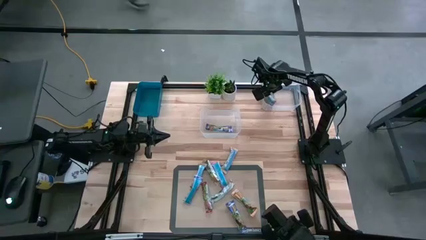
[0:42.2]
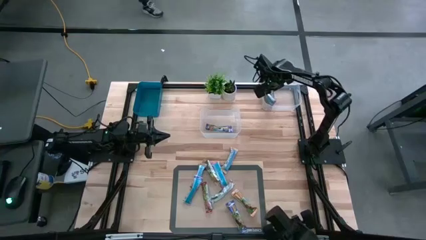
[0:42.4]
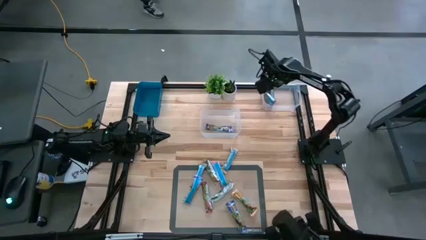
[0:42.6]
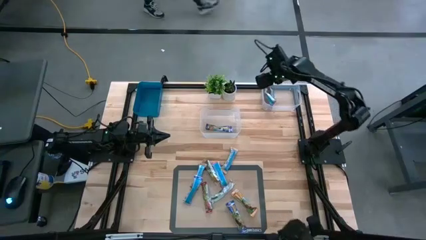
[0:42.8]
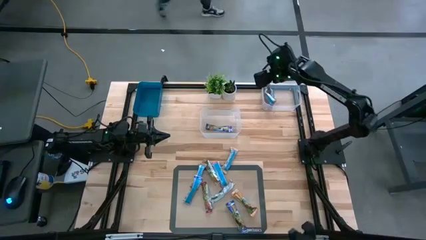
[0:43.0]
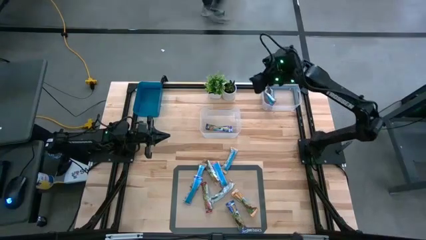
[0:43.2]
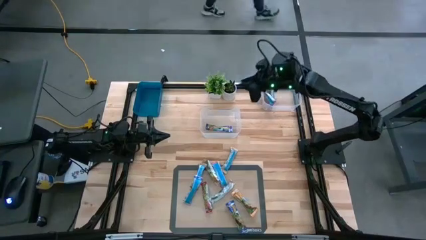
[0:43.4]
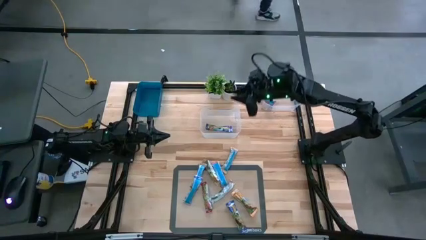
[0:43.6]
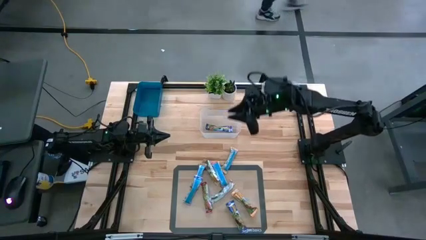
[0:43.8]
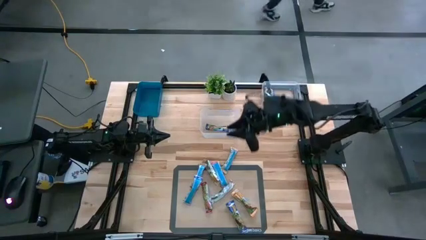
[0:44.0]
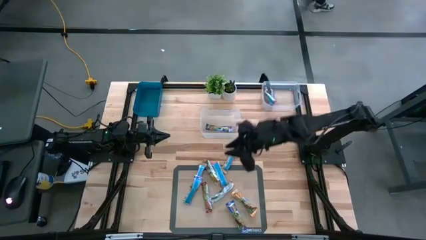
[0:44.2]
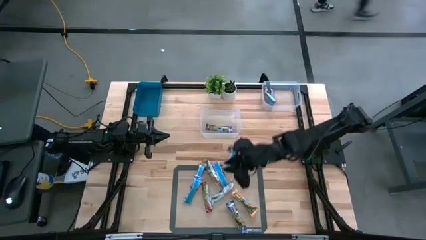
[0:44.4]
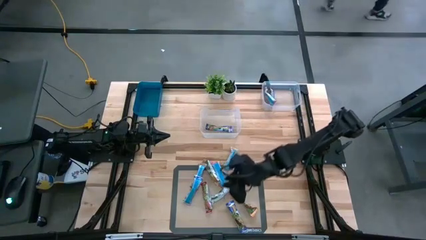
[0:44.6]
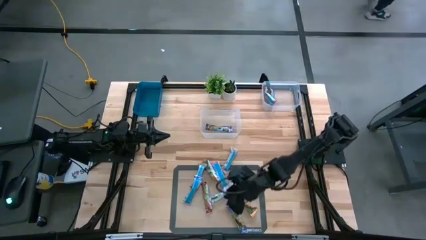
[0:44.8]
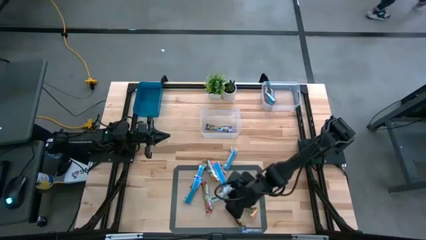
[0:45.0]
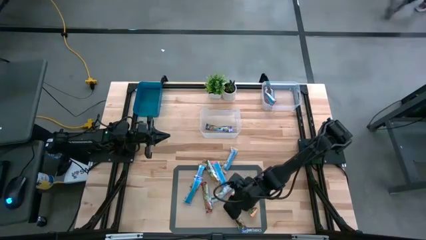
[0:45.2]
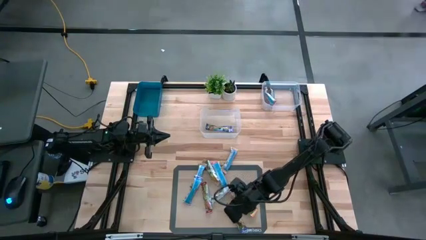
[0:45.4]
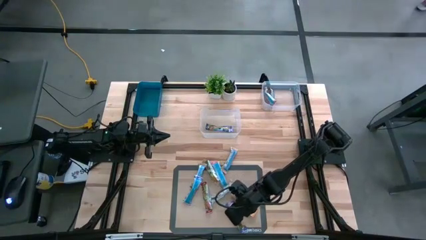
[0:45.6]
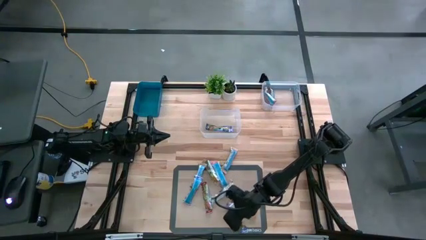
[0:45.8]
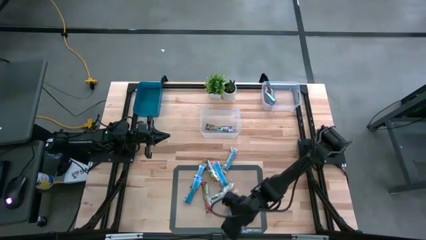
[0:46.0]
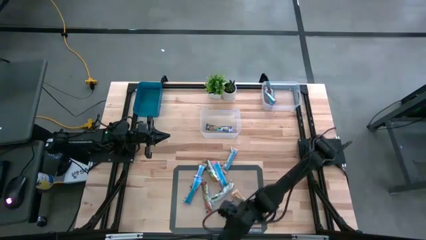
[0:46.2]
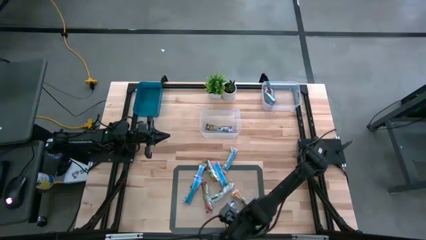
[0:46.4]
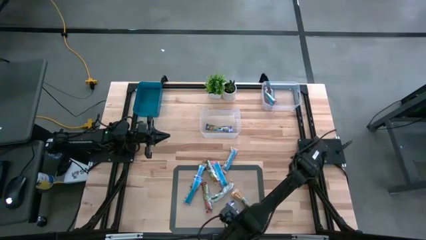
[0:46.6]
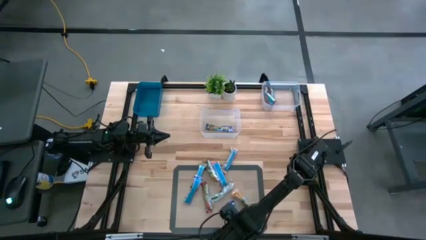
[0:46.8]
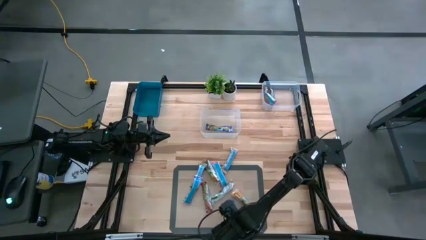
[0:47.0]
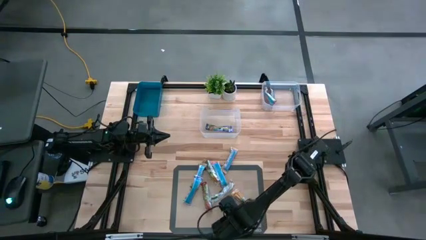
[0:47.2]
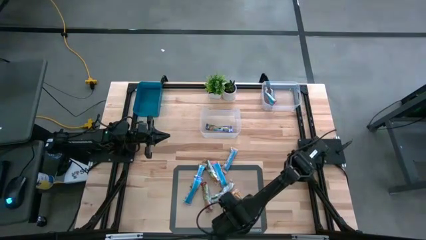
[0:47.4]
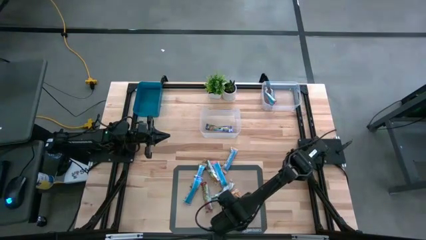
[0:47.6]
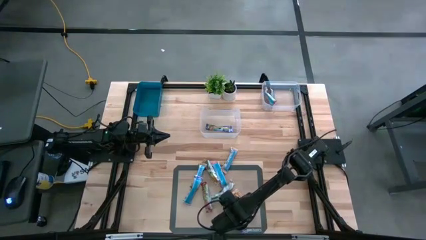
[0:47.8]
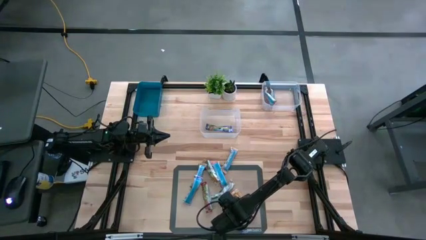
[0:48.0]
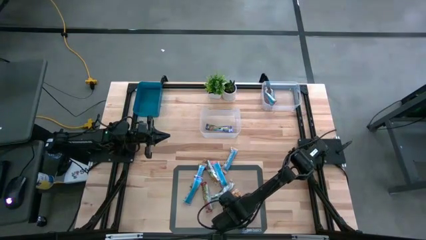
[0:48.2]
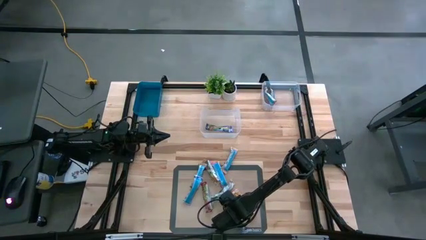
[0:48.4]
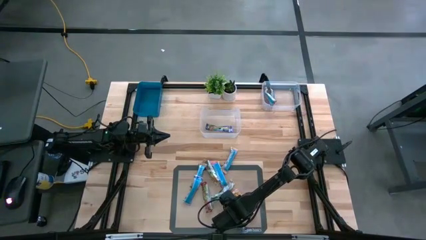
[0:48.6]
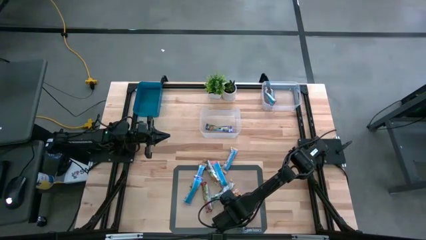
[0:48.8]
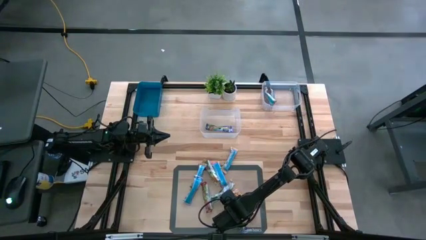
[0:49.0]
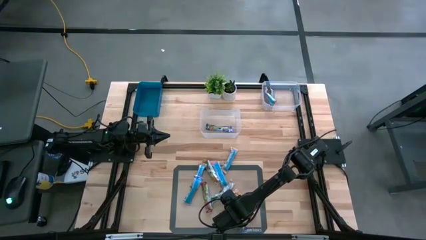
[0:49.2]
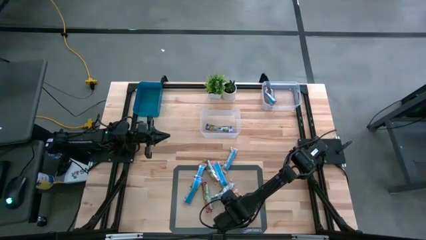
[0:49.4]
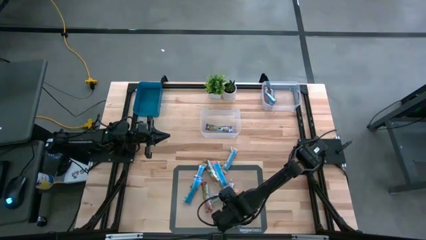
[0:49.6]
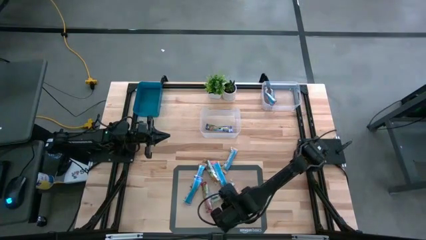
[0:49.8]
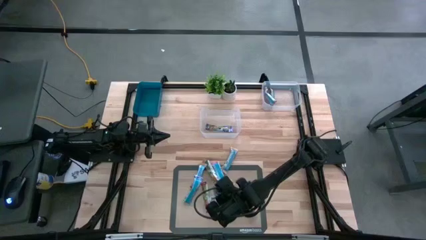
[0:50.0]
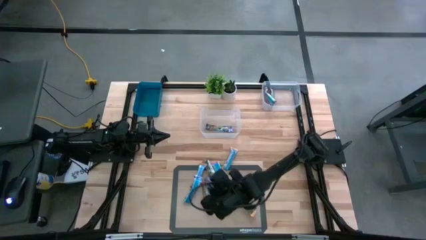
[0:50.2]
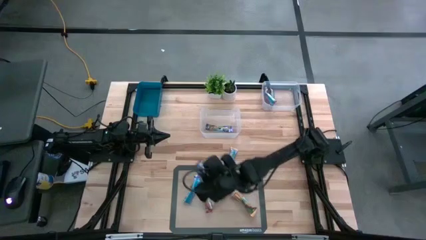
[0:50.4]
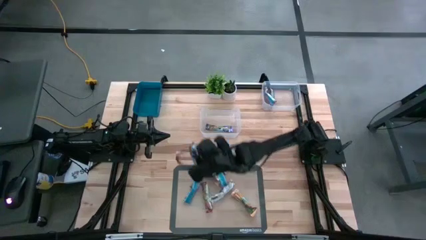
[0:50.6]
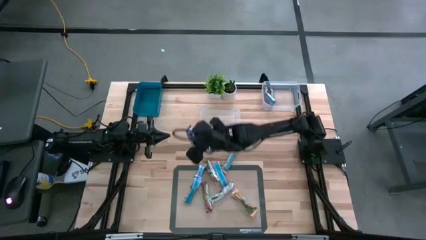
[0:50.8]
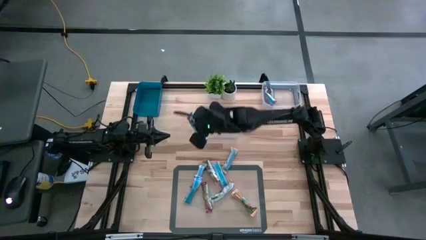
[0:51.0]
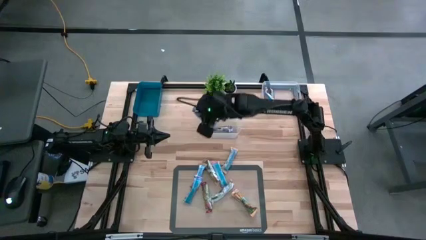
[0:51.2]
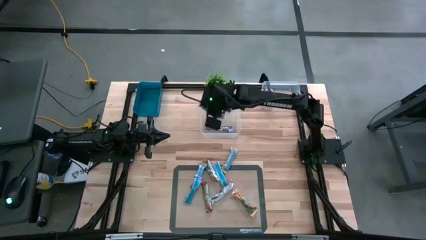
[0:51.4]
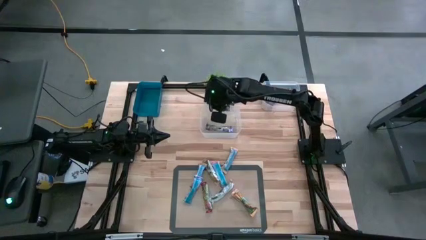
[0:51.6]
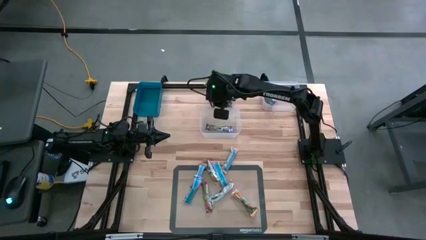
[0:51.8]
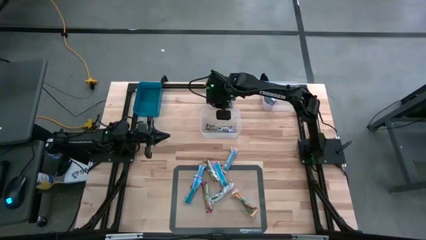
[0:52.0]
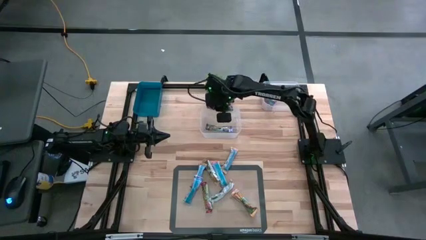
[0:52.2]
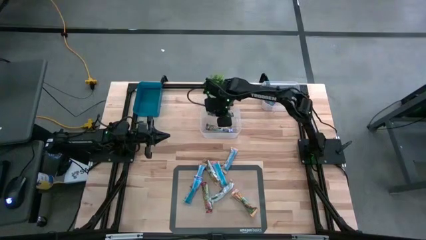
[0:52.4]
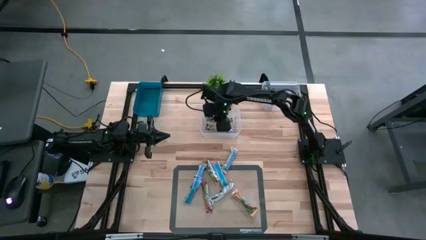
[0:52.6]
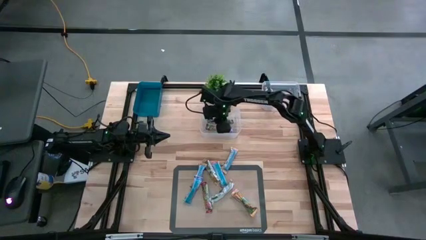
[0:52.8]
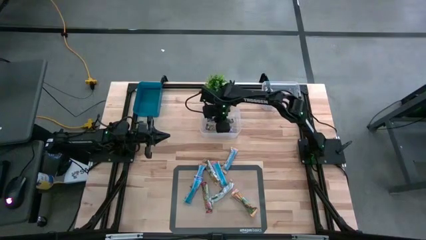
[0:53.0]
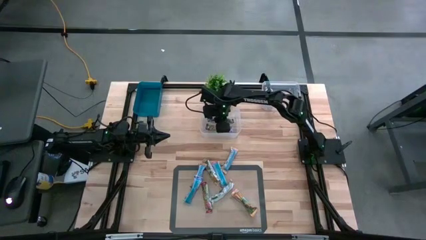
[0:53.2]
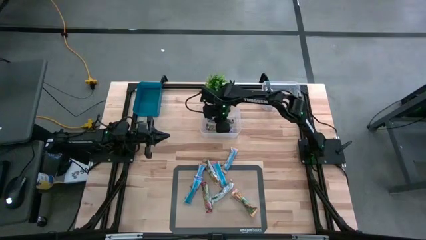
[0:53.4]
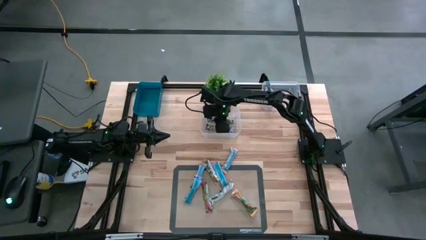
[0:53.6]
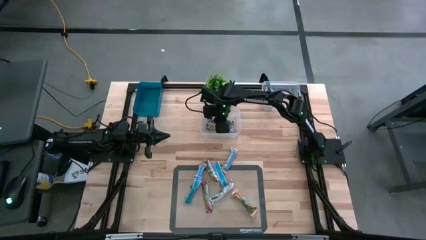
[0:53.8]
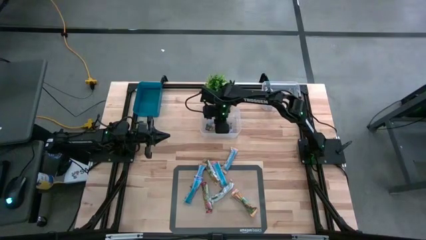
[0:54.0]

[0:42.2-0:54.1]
Task: Pick and place Granola Bars by type
Put the blue granola bar in the left transparent bin
